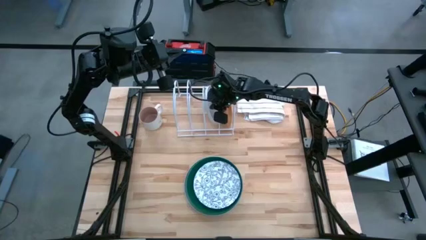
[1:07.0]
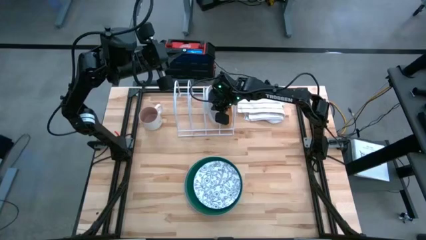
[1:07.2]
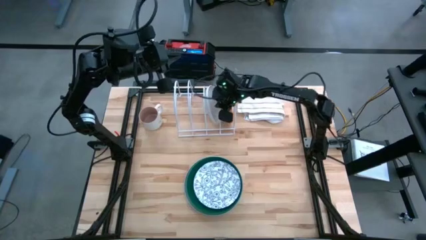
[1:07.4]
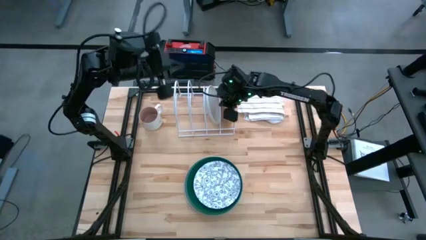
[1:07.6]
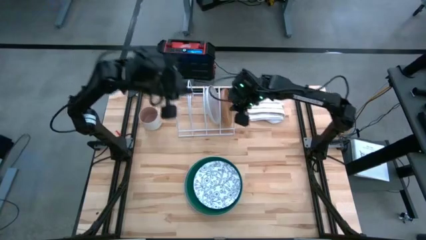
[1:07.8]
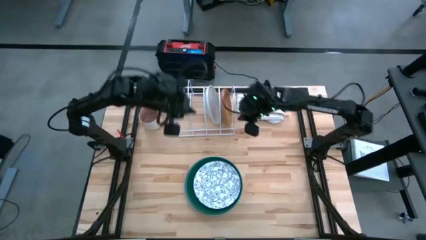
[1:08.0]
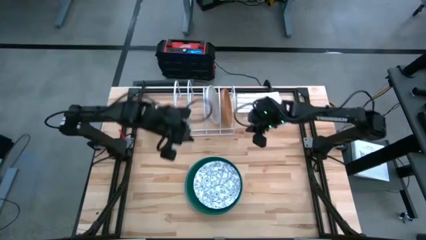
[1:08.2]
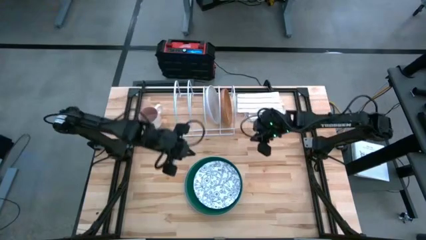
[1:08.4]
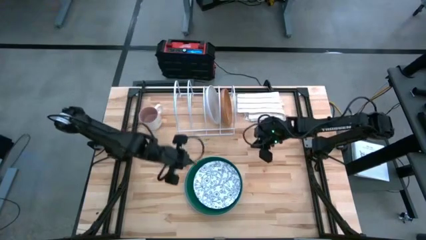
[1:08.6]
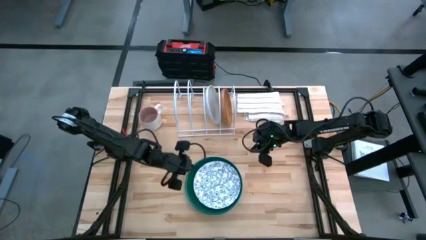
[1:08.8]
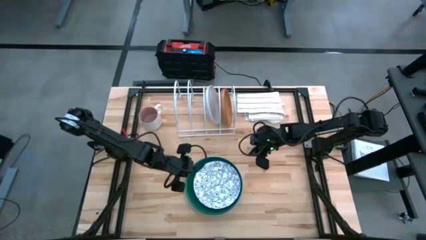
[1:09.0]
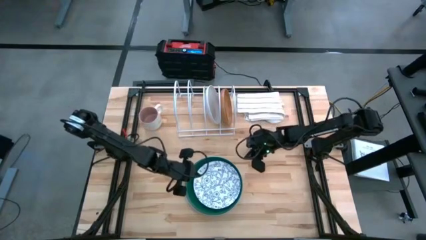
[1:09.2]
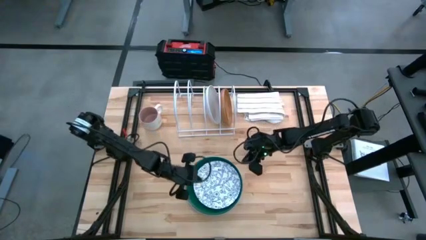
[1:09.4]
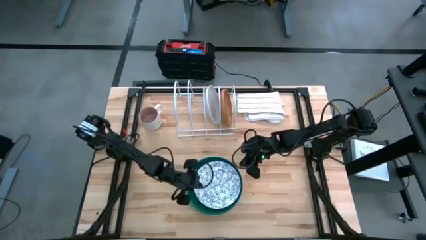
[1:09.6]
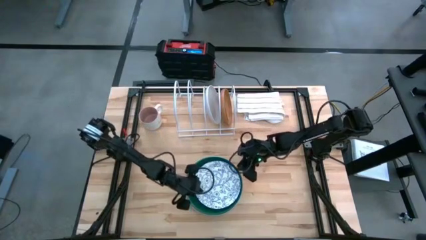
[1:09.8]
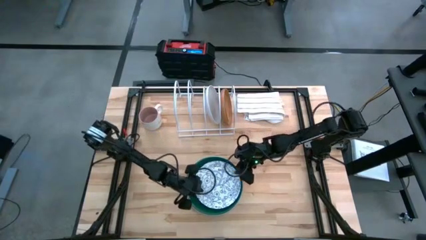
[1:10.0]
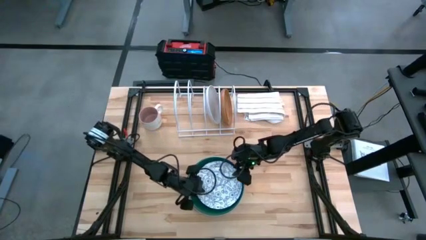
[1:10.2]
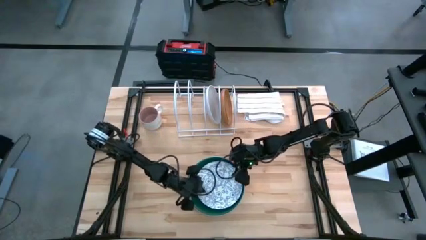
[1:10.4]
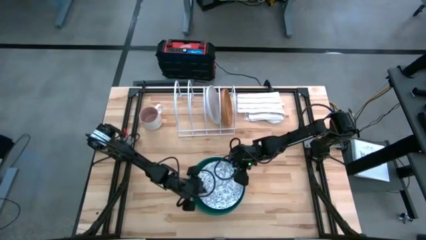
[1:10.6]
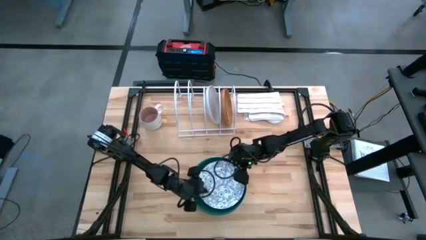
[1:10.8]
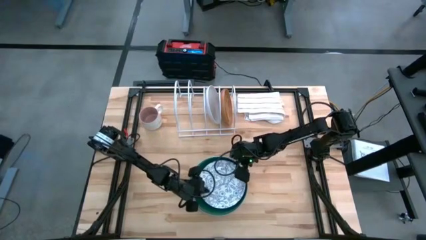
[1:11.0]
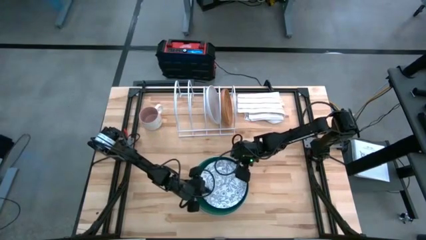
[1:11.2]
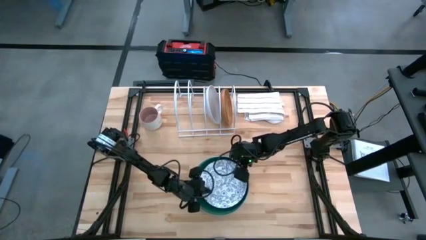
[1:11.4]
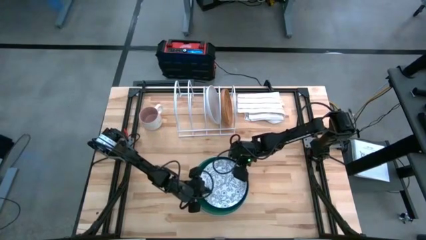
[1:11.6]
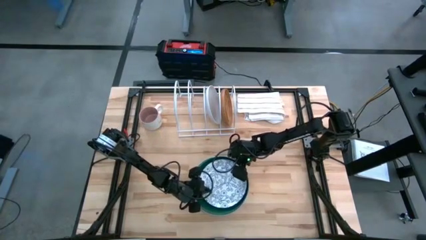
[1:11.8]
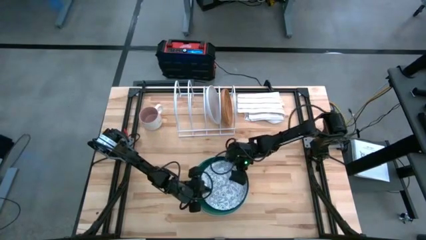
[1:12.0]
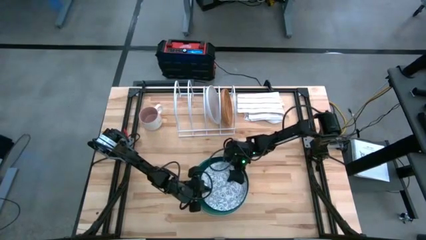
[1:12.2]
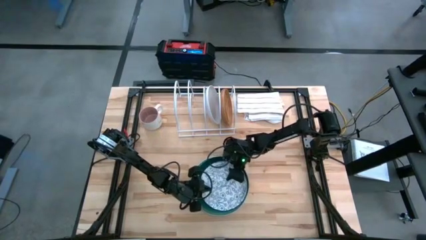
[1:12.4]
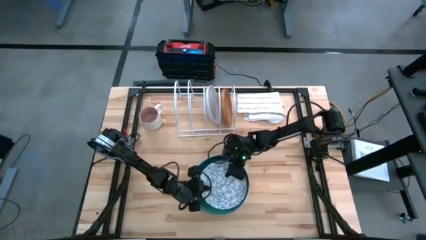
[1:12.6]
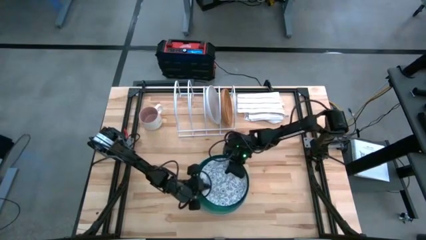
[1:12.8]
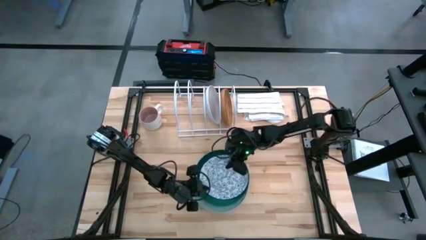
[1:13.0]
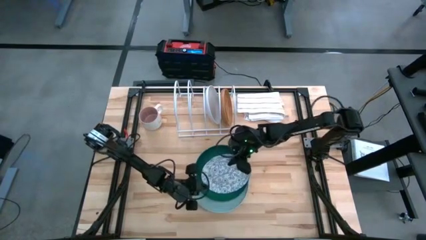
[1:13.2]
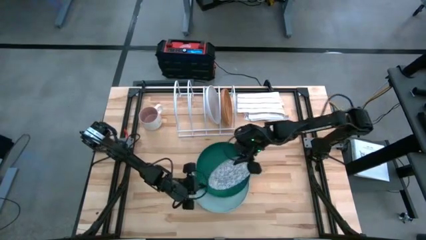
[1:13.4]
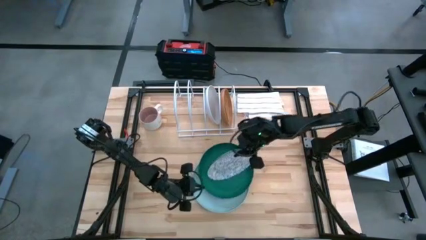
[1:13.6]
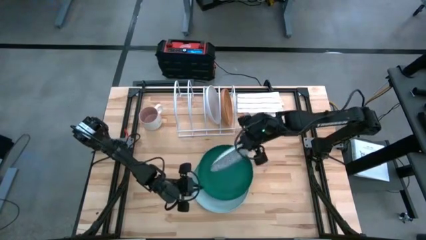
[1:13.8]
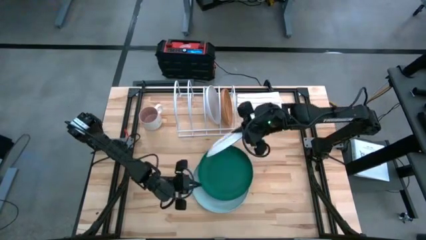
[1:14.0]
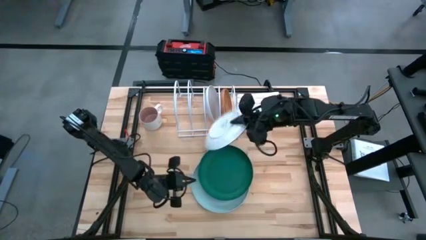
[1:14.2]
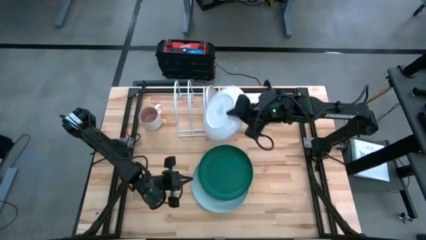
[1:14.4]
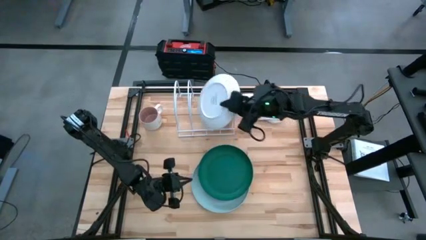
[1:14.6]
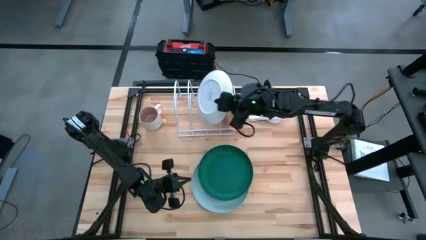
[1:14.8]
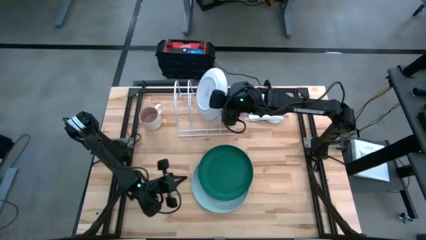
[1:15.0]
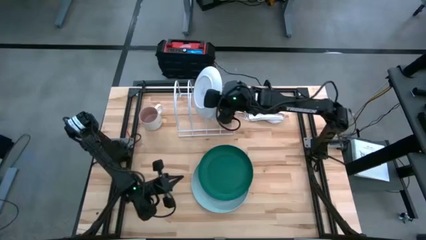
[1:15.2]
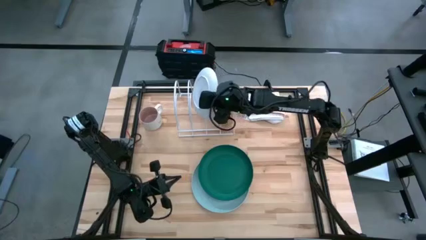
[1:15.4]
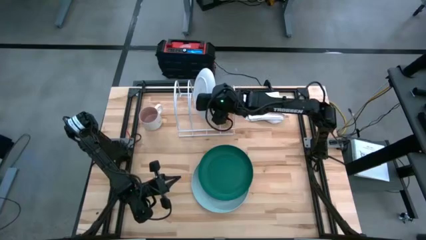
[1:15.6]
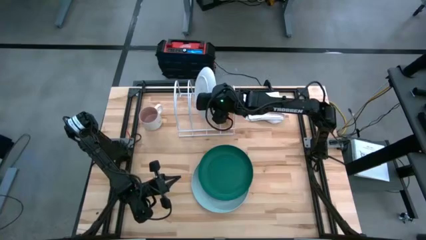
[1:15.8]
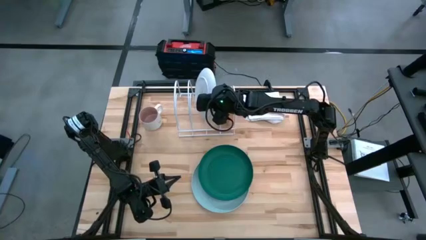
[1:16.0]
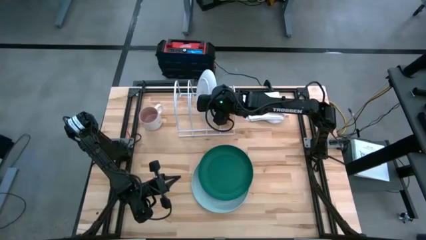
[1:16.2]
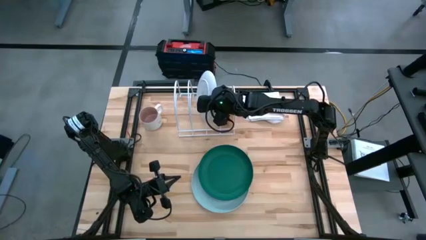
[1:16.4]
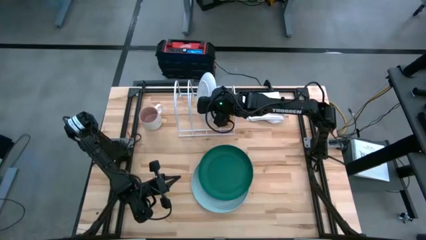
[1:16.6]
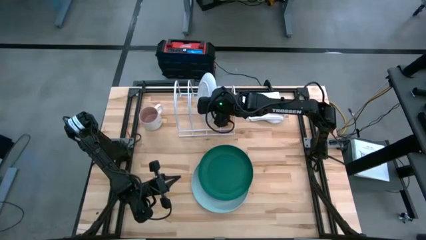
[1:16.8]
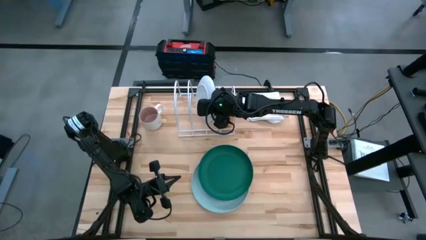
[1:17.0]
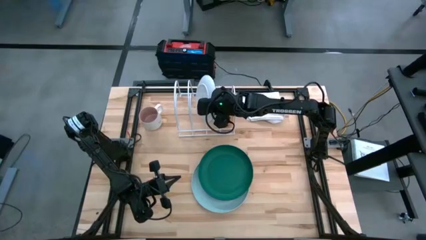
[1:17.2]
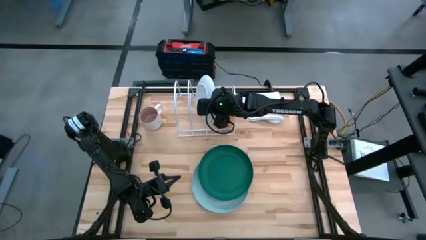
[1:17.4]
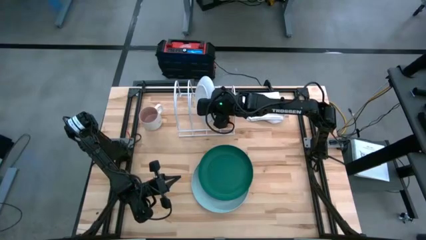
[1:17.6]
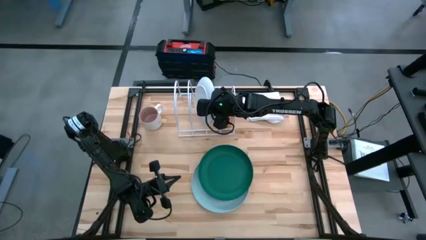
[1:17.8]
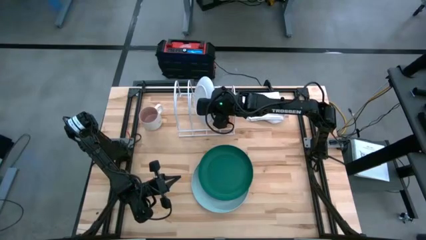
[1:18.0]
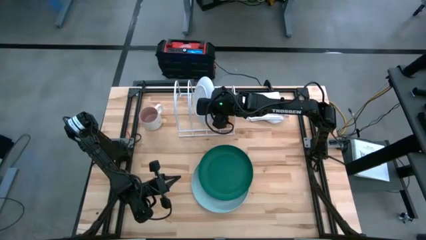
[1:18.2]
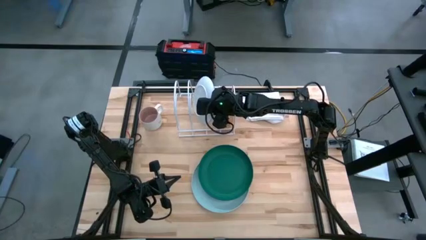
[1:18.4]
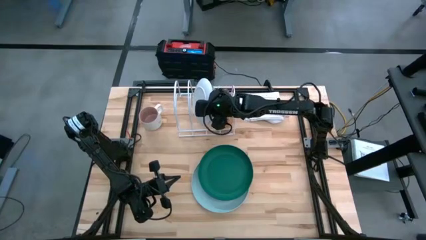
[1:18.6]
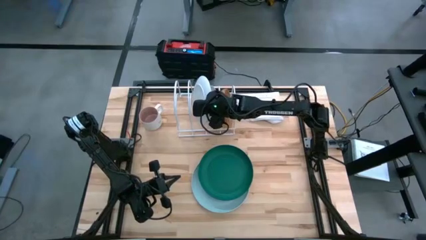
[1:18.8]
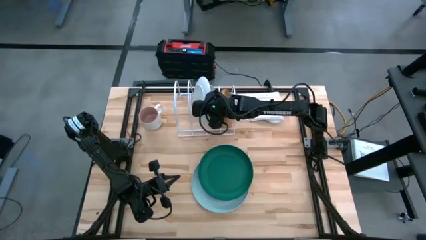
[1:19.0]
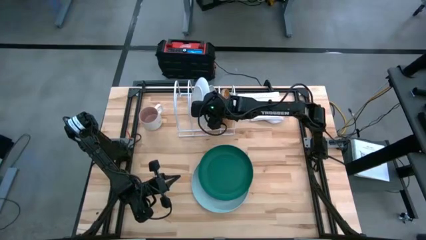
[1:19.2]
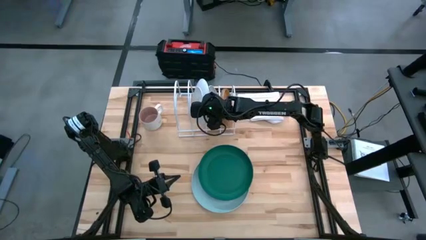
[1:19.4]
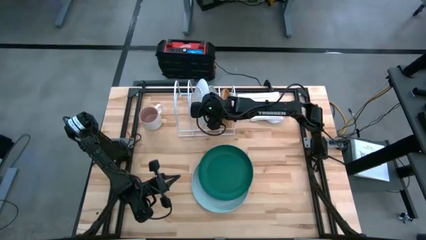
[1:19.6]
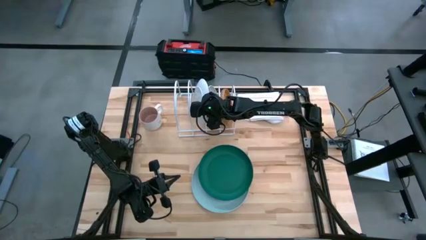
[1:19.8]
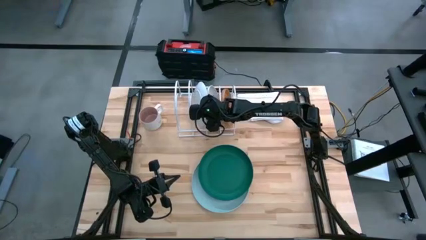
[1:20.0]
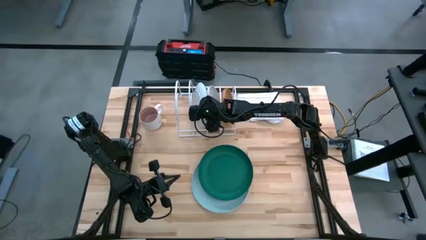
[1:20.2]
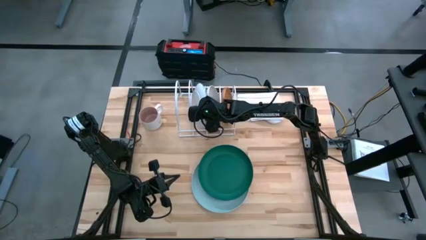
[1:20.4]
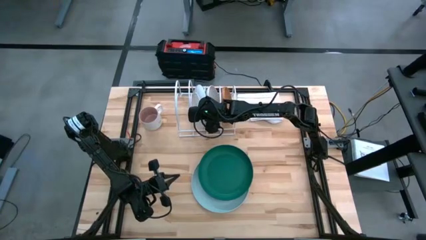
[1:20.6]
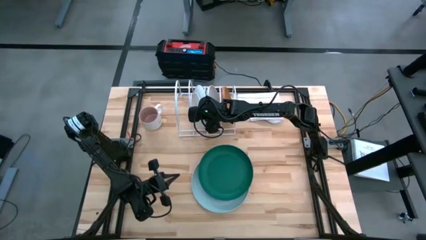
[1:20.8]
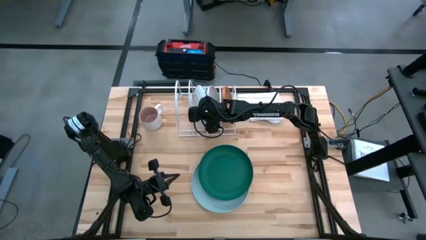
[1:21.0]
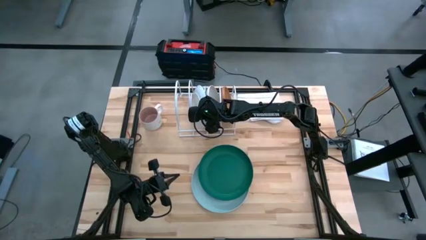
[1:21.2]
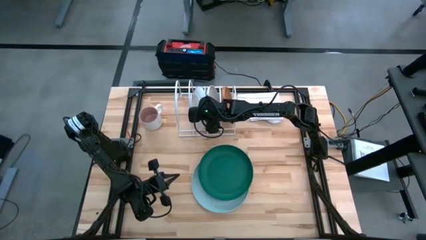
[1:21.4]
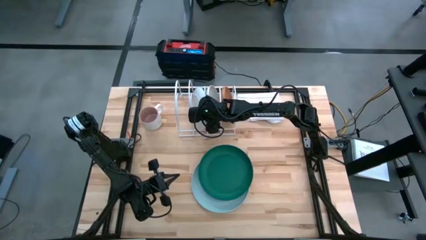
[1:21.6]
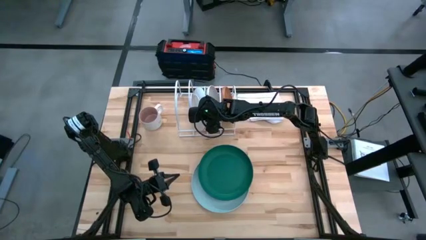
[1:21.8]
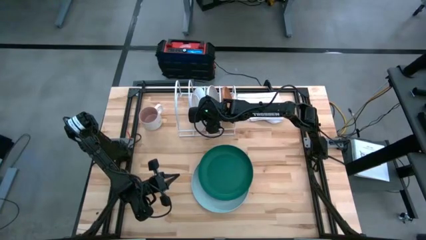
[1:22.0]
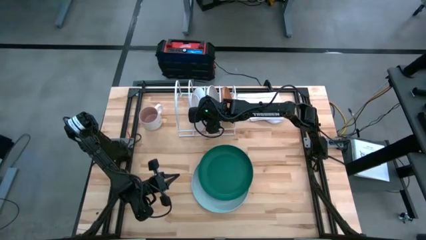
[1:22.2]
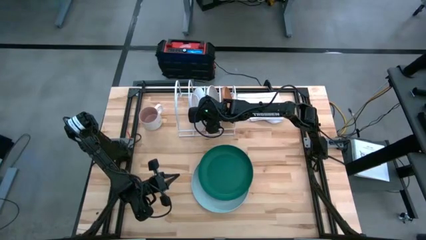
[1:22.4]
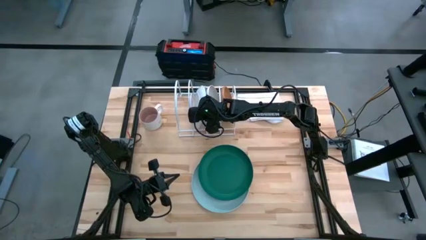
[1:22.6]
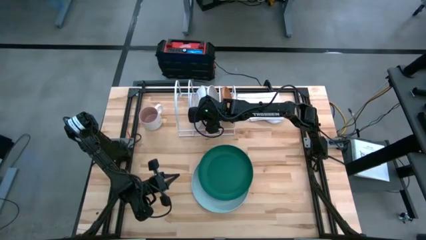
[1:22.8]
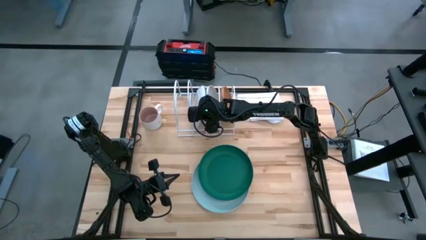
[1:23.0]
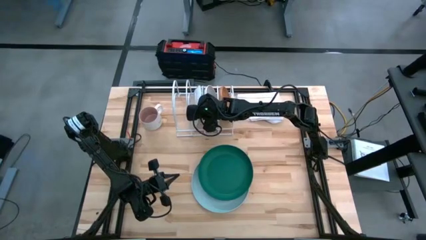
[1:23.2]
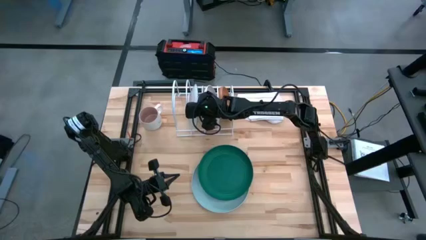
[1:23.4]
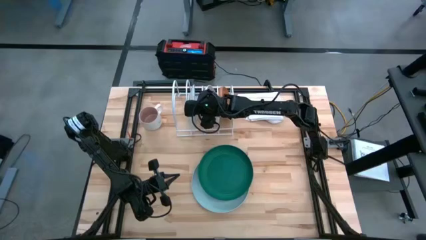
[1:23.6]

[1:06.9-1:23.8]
Task: Sort dishes
Put the white pattern plate into the dishwasher rack
